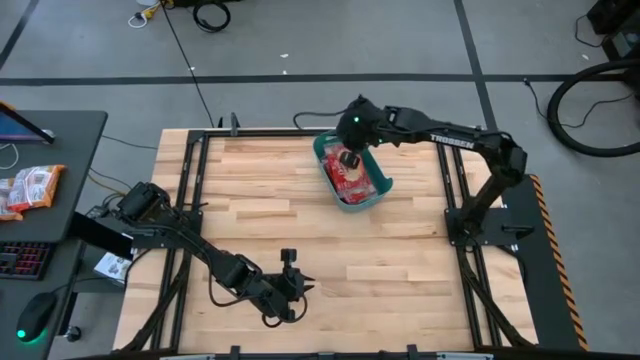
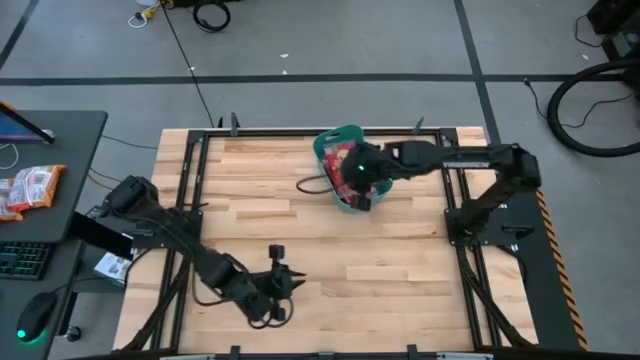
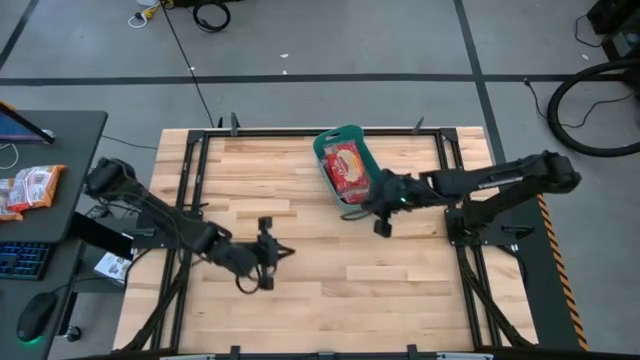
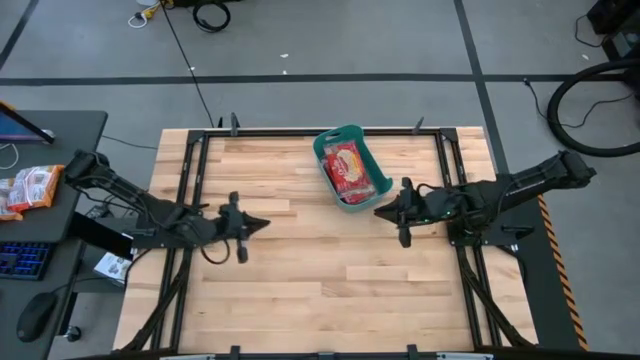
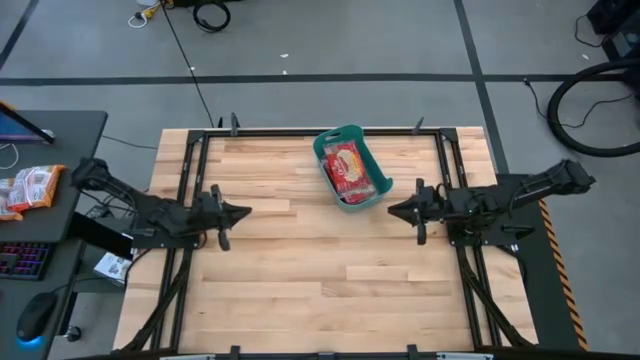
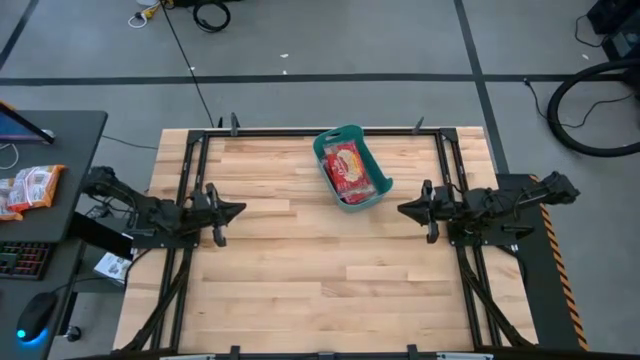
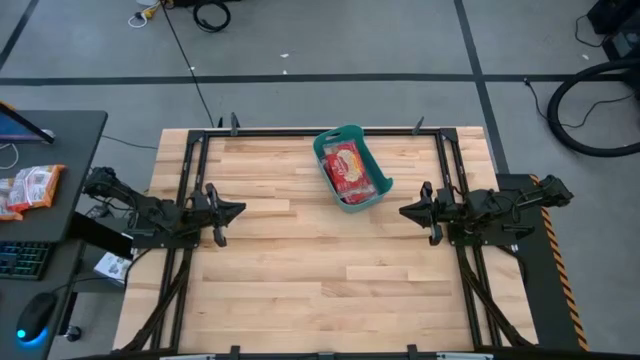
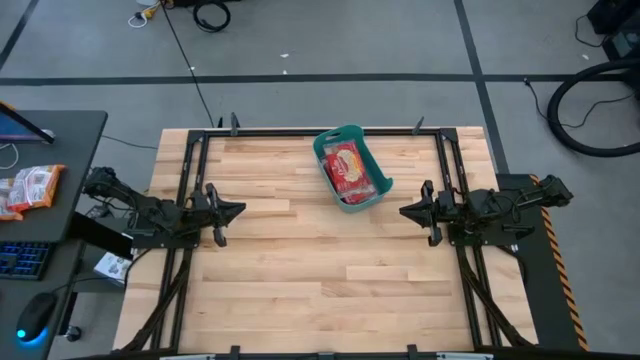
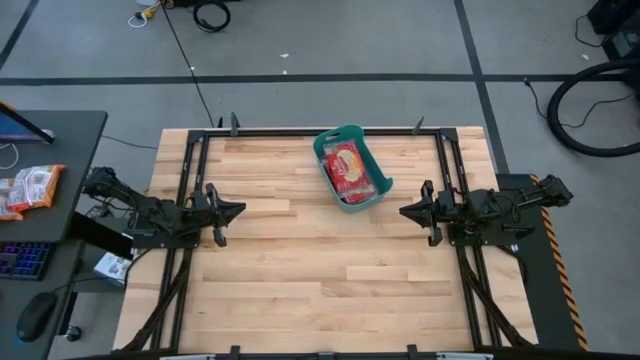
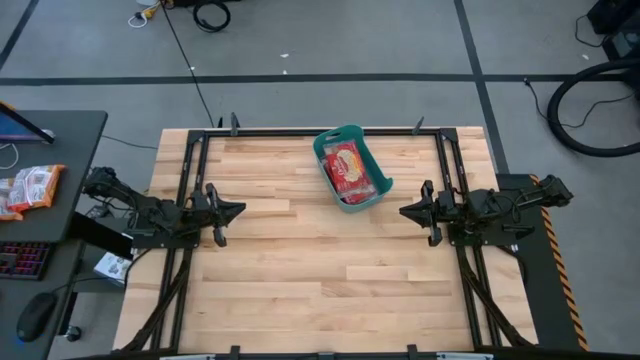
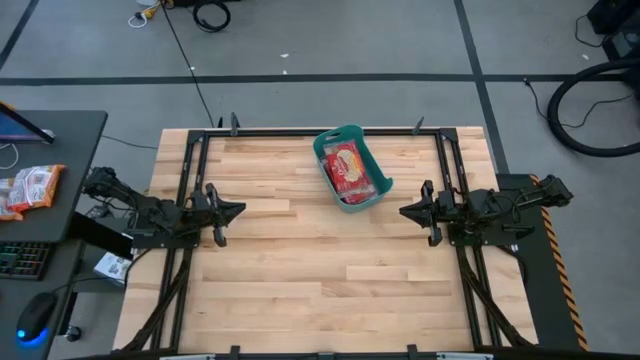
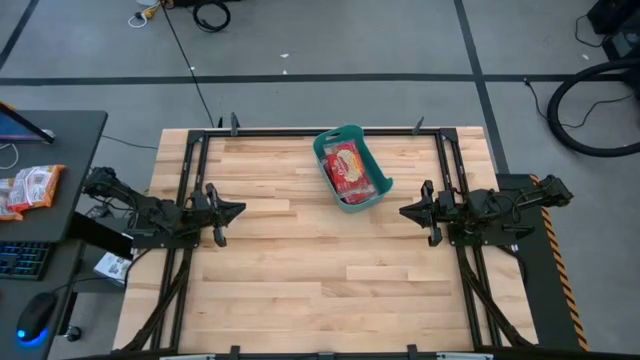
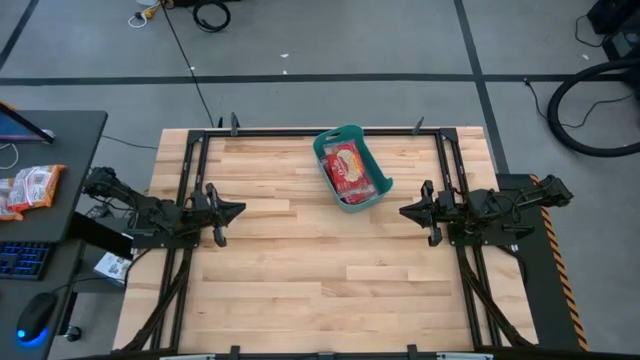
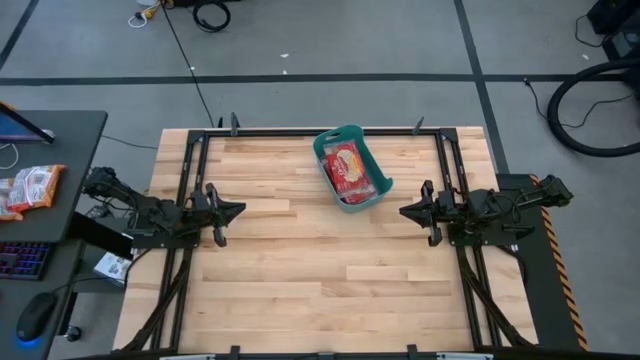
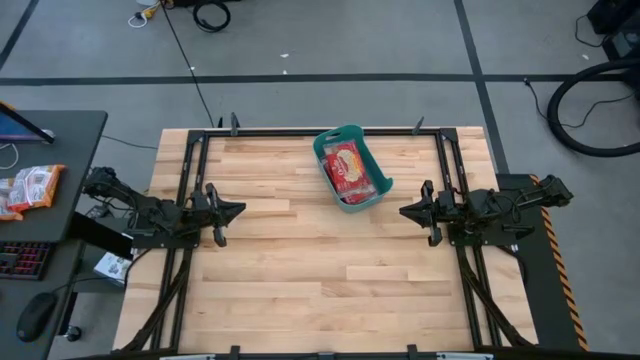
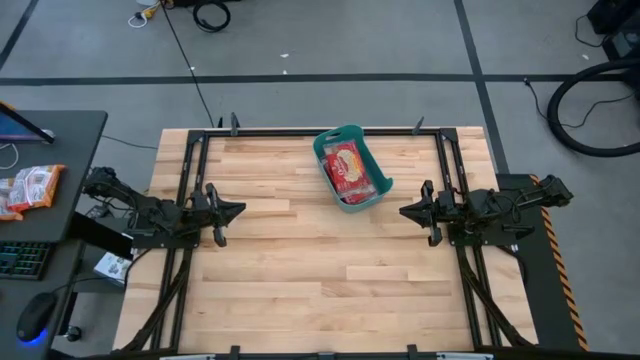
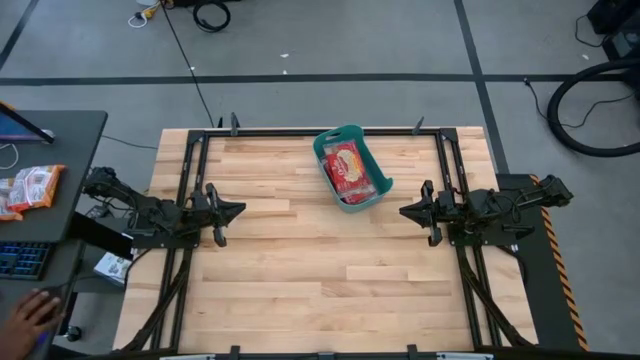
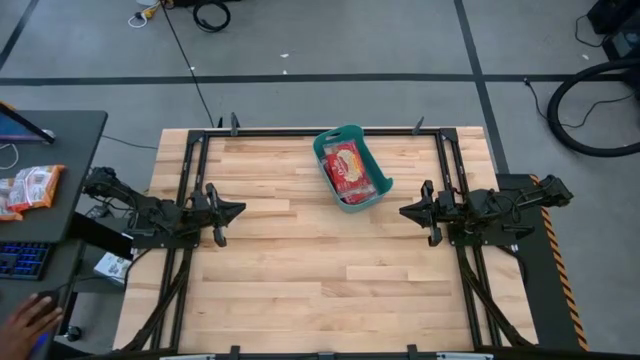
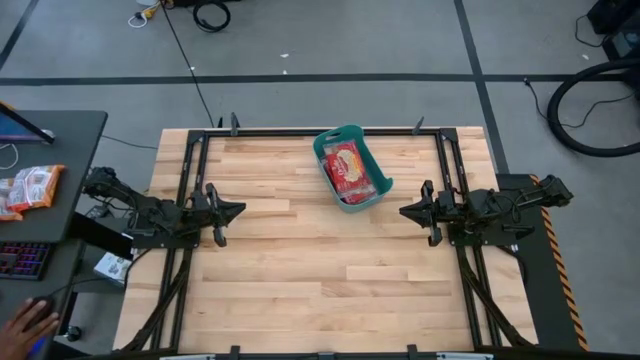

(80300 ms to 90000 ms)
Task: Sort popcorn bags into baskets
Return to Home Position

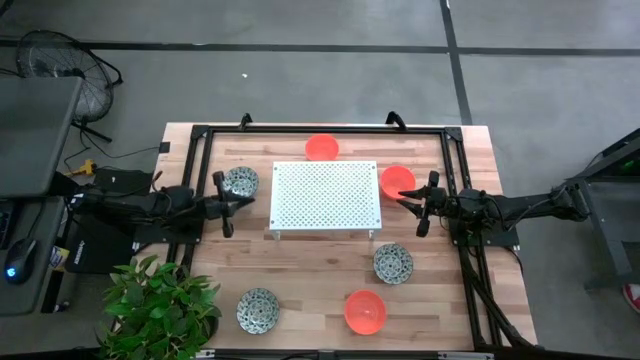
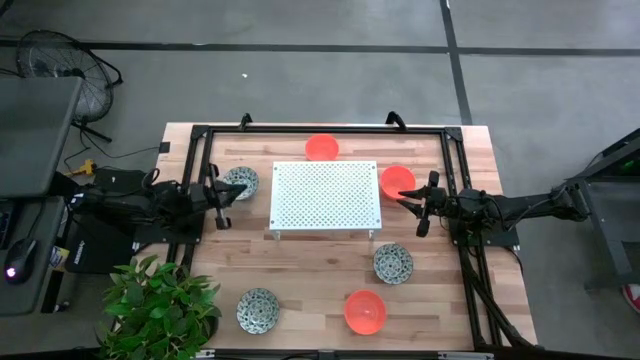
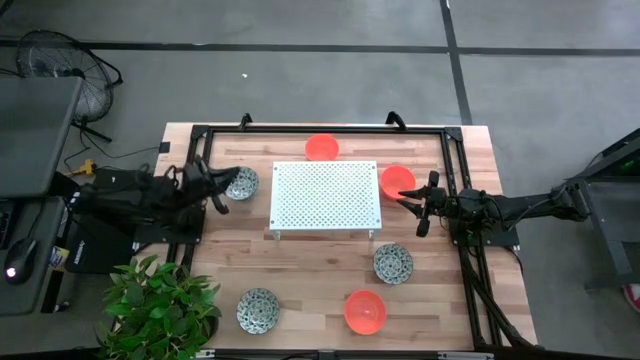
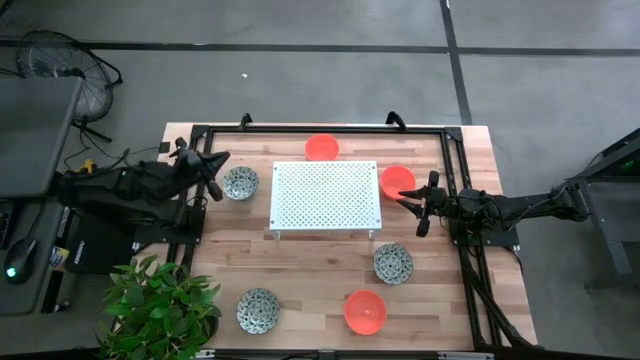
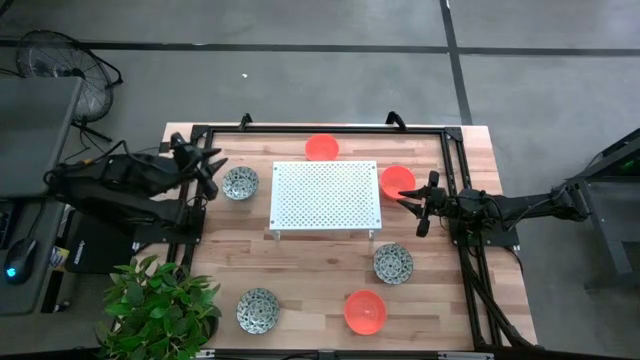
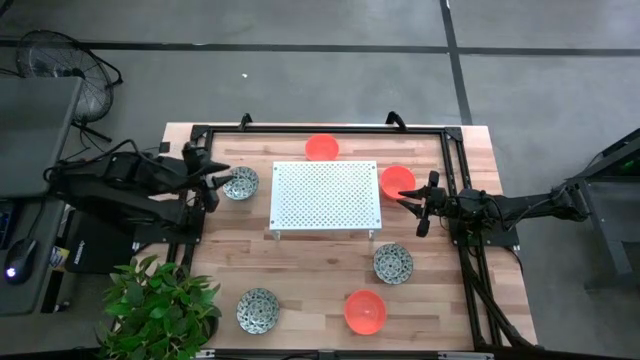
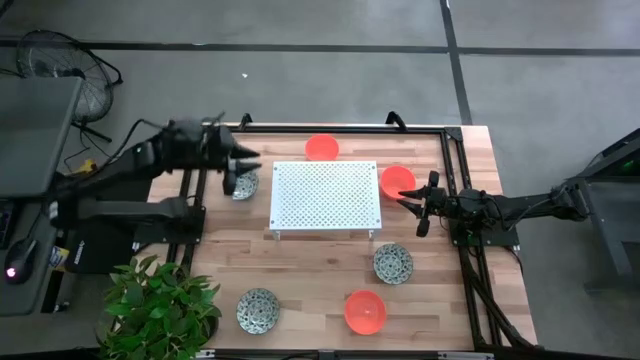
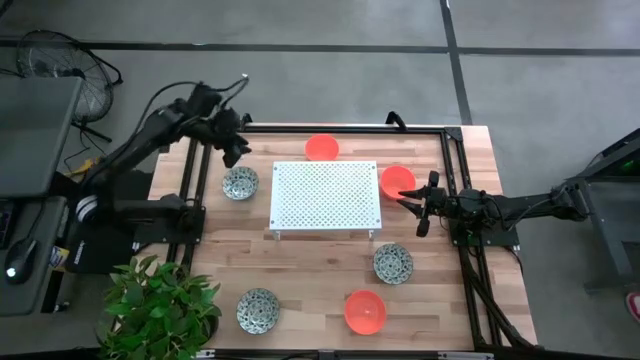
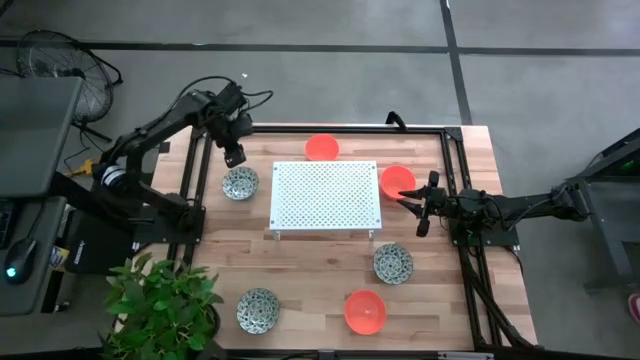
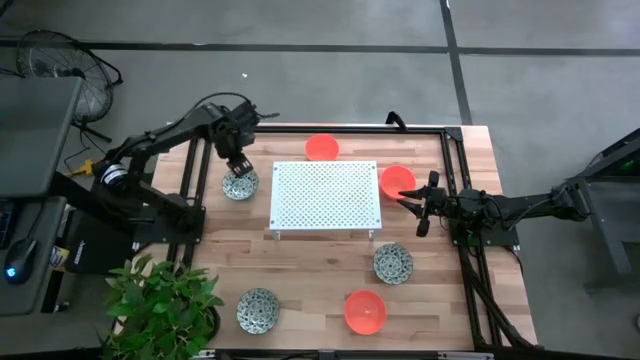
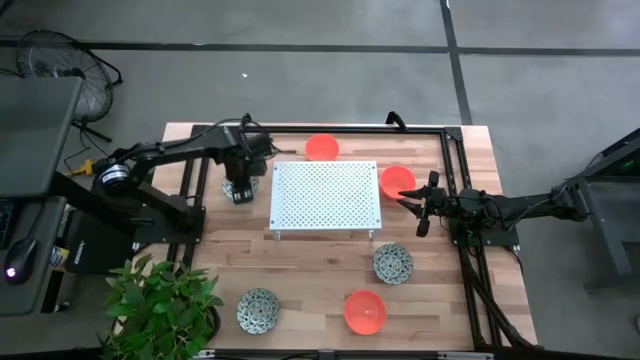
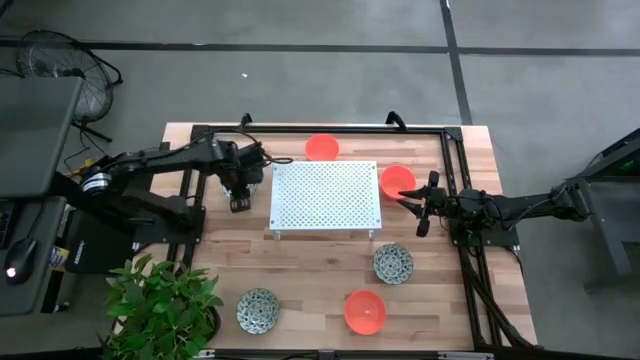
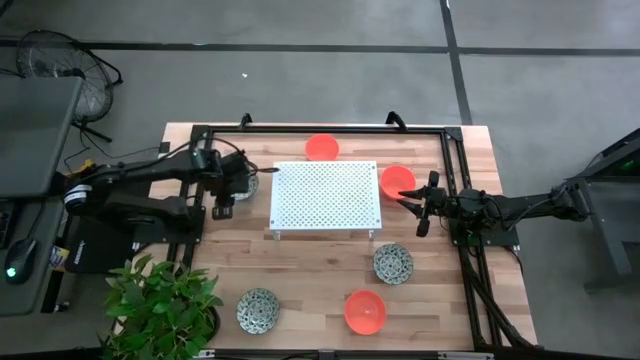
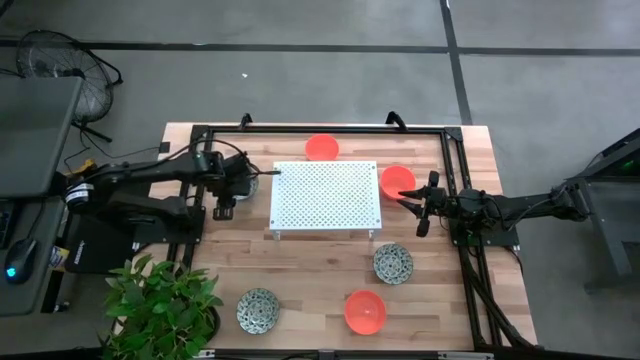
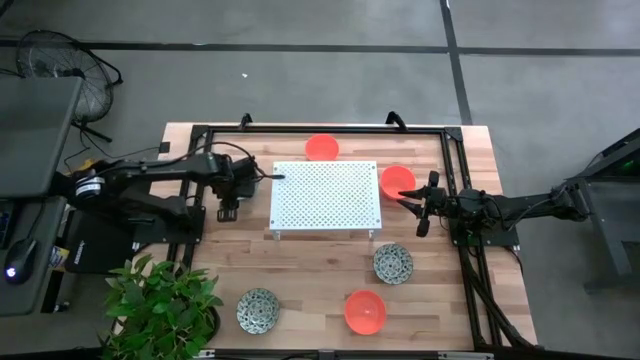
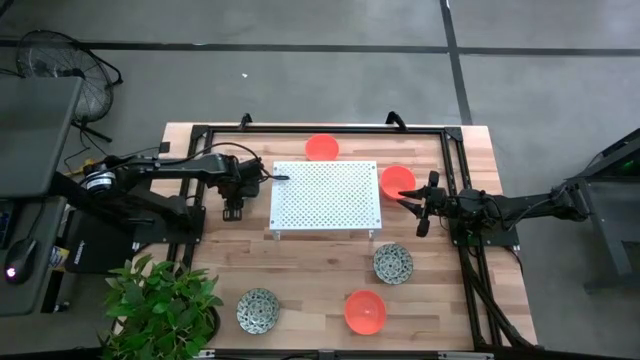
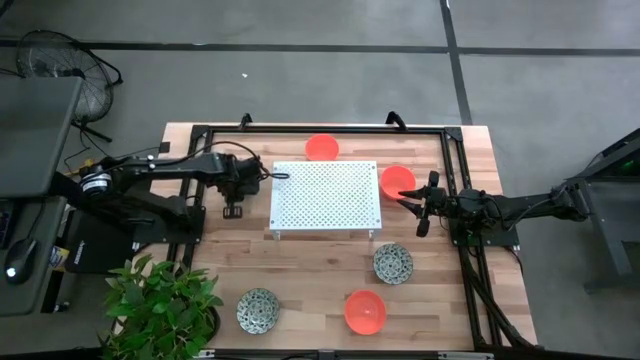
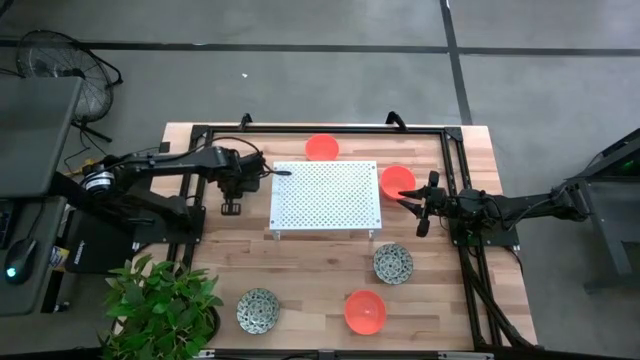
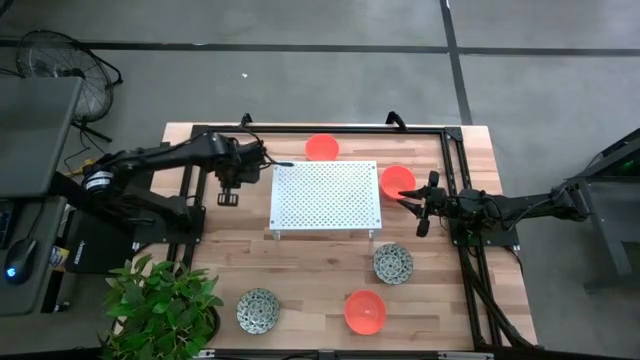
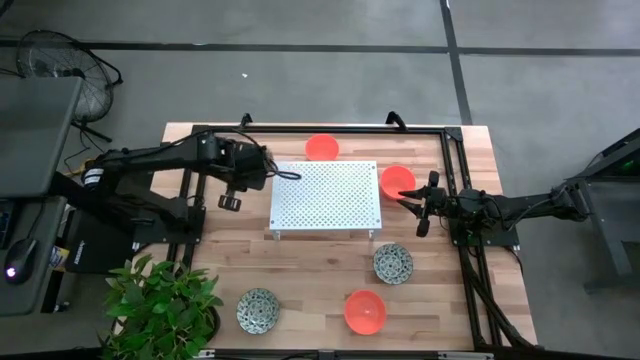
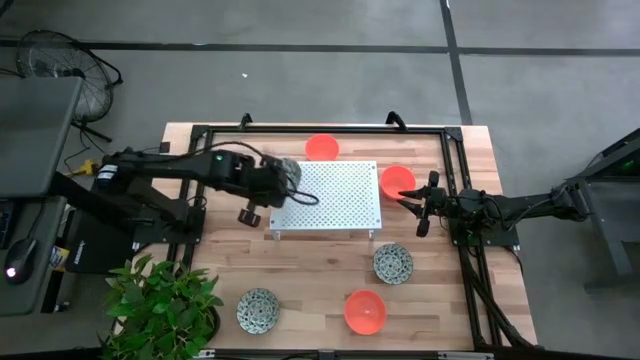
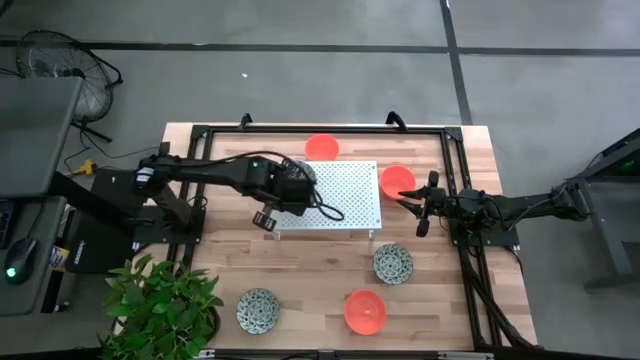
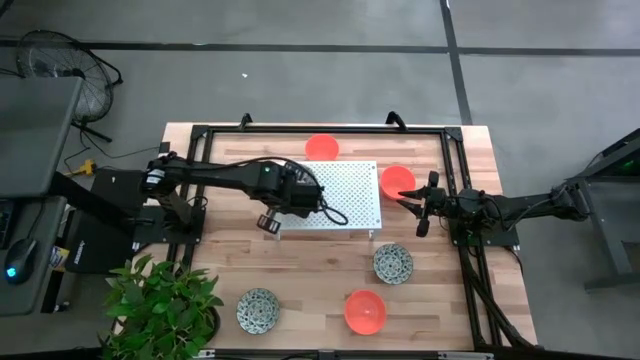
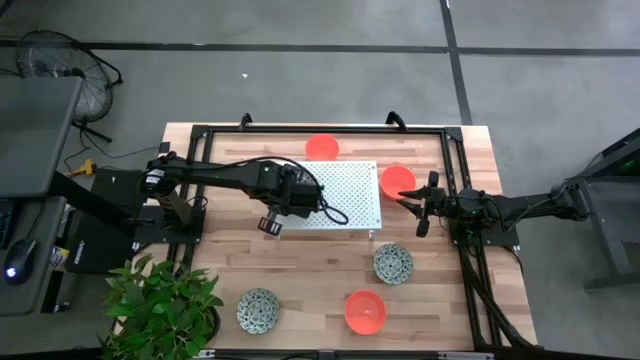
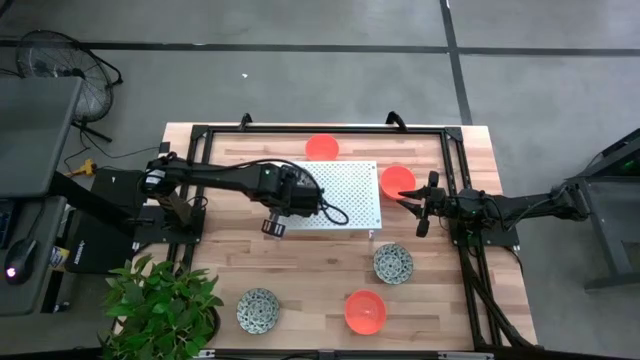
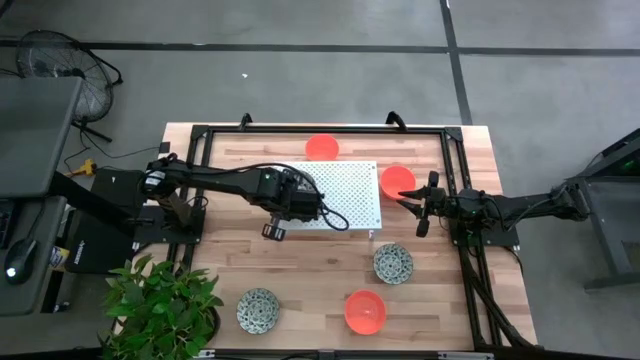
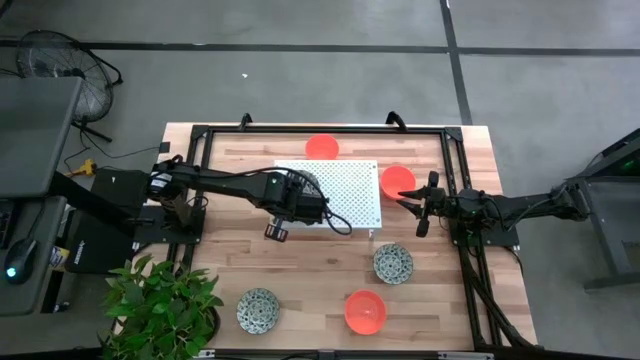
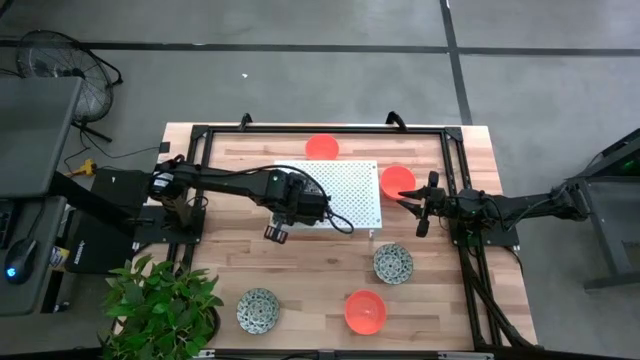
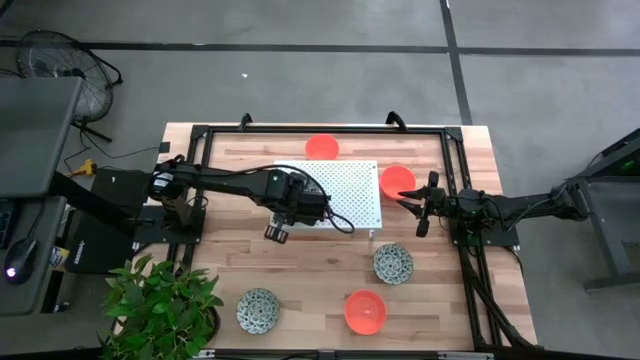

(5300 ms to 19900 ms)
Task: Pick & Place Mini bowls
Put the top left white patterned bowl on the shelf
